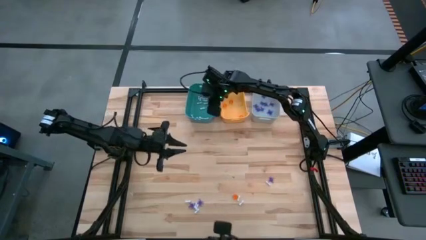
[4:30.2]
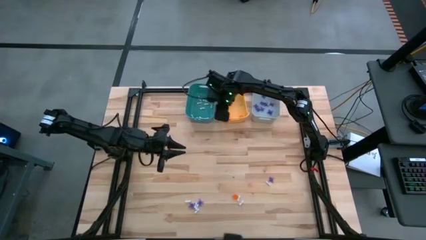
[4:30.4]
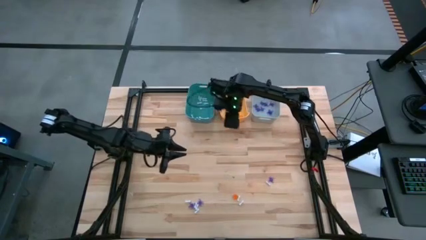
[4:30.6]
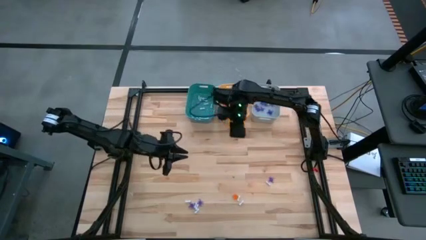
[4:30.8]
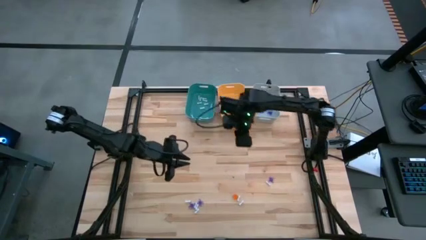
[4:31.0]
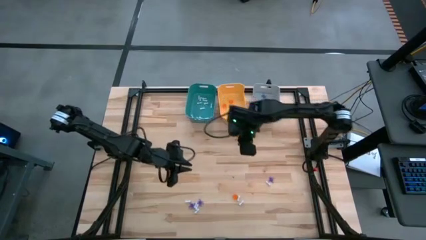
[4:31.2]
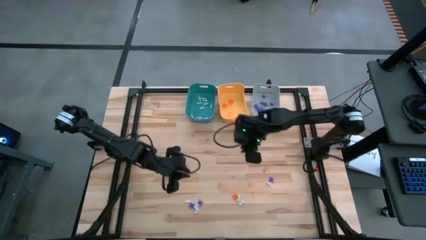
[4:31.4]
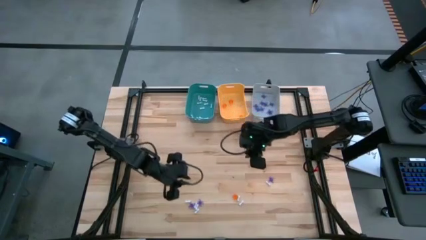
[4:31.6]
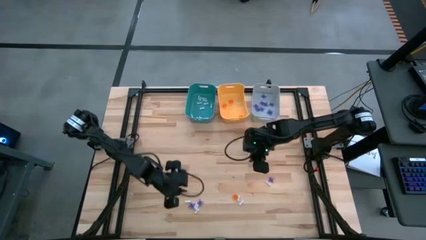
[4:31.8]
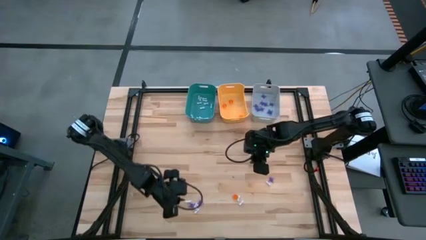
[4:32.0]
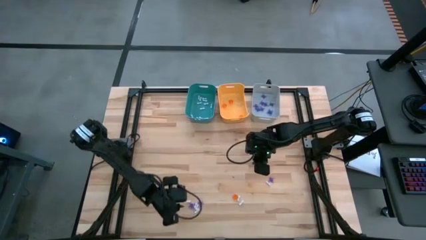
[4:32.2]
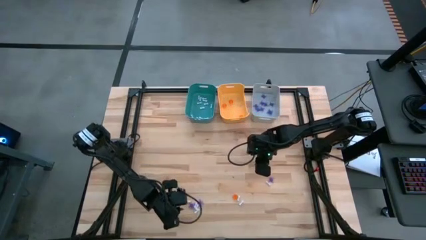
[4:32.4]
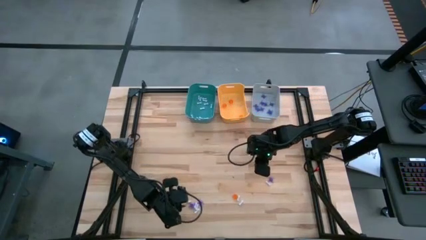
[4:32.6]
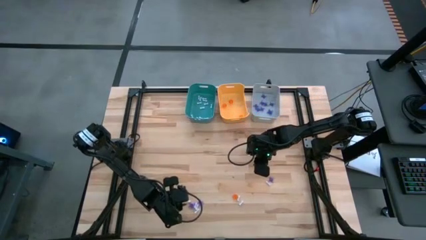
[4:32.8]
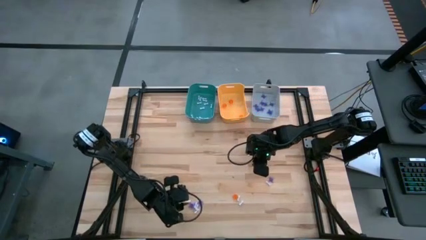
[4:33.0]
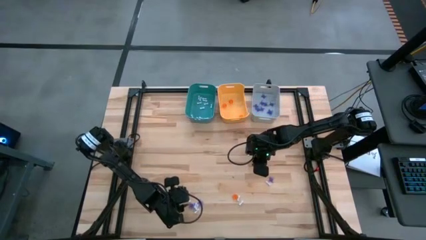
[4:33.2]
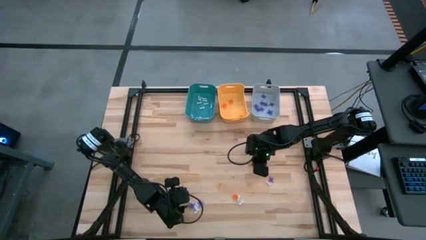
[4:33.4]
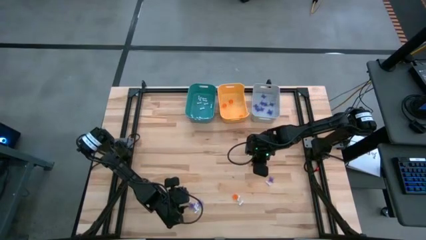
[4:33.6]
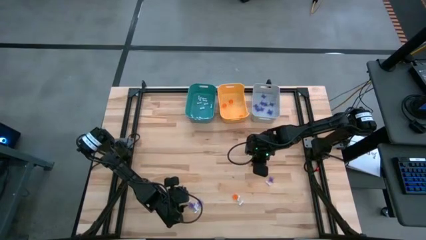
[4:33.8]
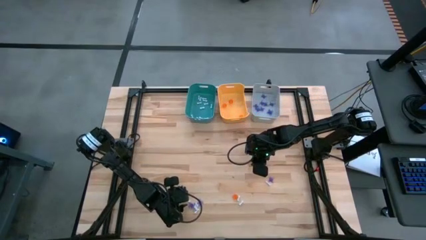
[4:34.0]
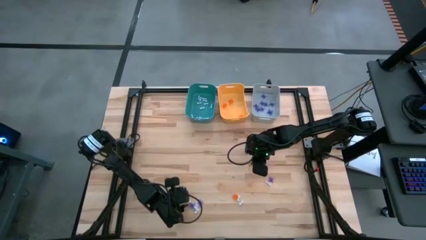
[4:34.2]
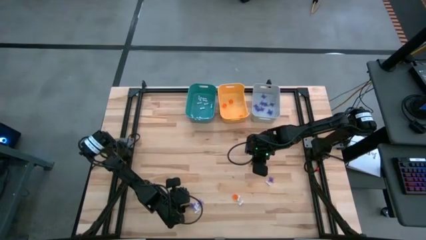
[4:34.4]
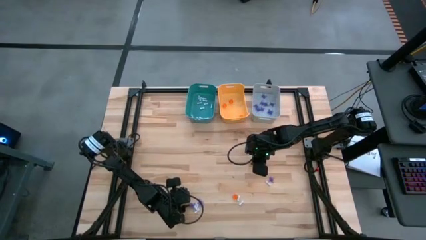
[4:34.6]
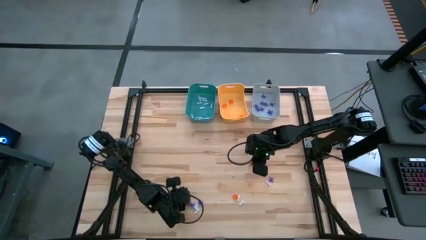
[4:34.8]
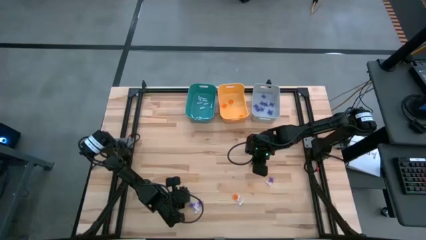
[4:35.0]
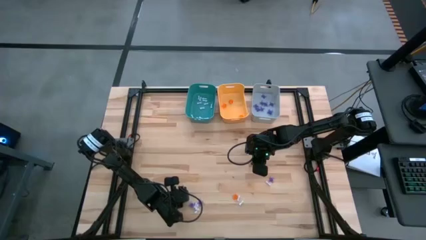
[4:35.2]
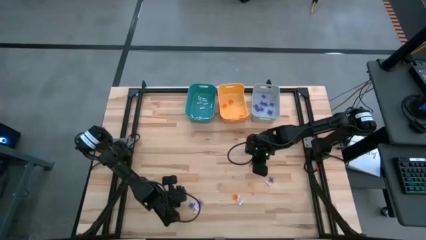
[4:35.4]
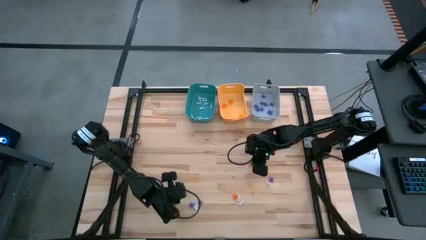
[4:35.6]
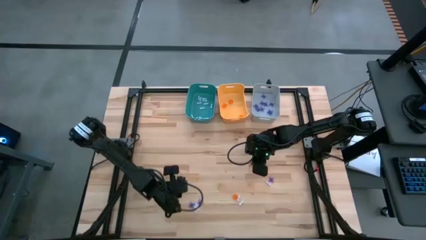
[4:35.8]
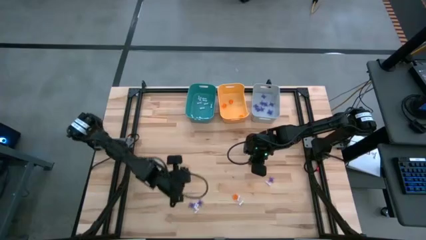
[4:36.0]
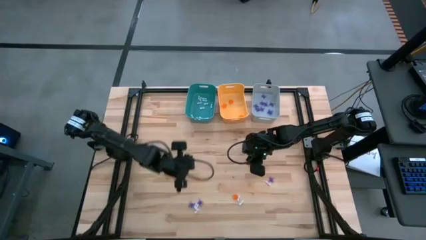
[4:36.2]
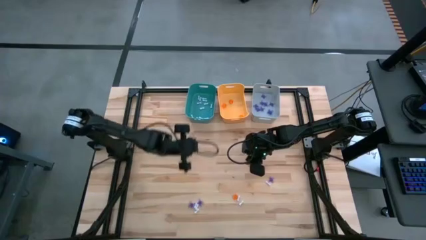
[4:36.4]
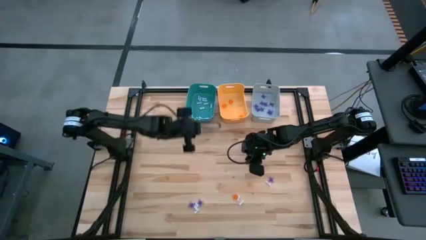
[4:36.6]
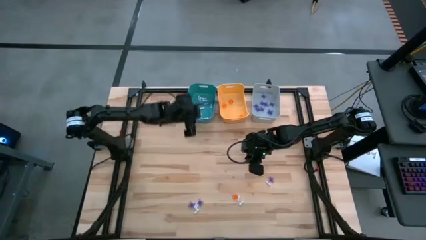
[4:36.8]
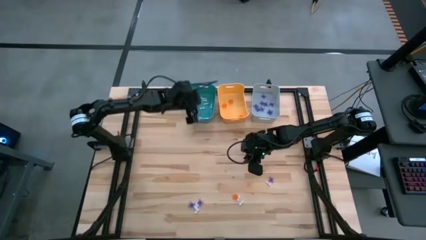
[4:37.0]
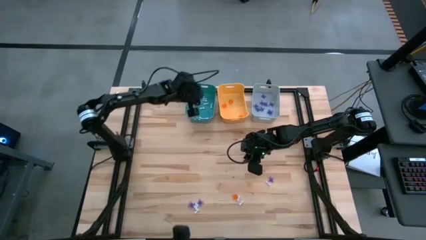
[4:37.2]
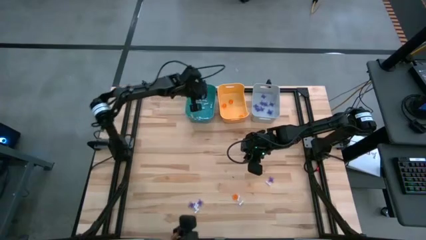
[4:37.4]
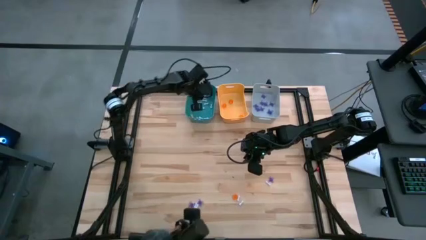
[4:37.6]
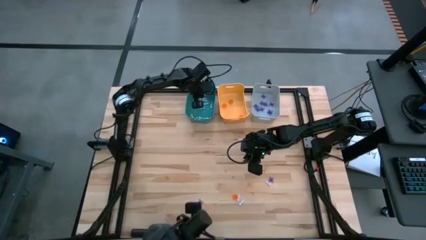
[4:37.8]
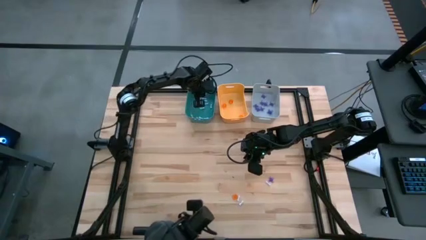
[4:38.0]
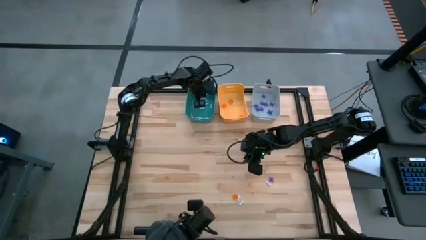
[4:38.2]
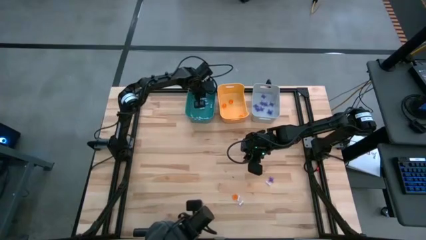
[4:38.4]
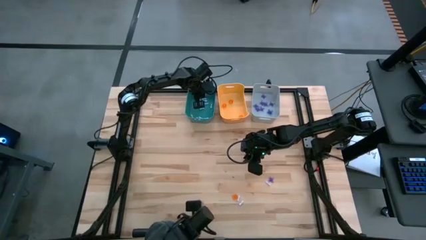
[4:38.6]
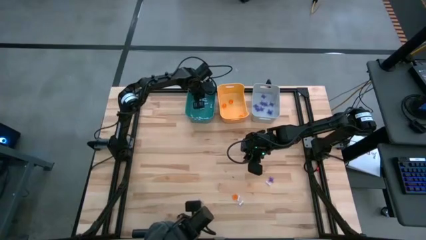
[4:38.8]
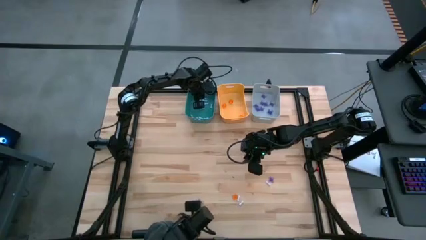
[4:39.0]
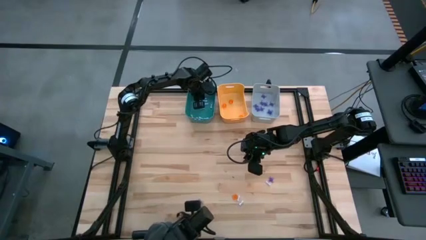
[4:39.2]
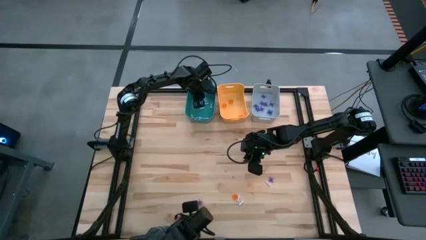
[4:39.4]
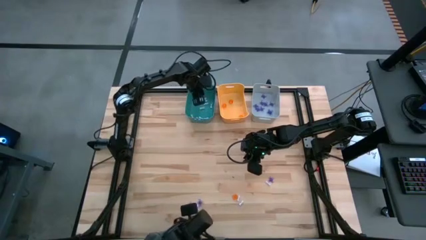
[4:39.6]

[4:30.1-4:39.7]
Task: Sort Halloween decoration
Put the white bone toy into the blue bin

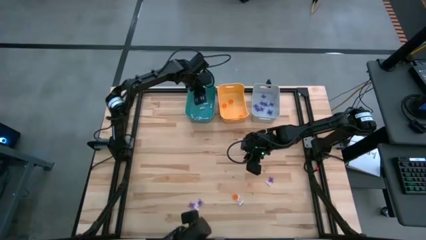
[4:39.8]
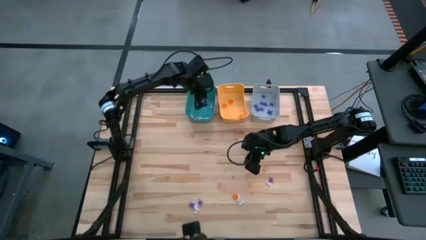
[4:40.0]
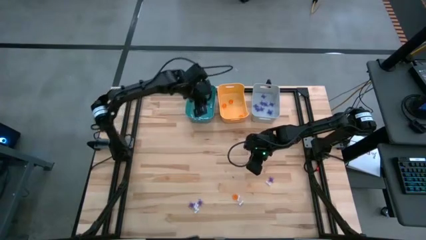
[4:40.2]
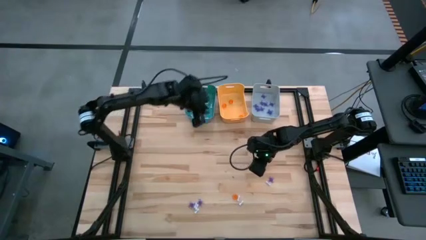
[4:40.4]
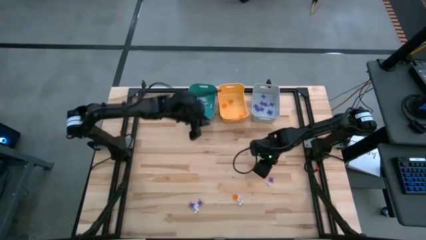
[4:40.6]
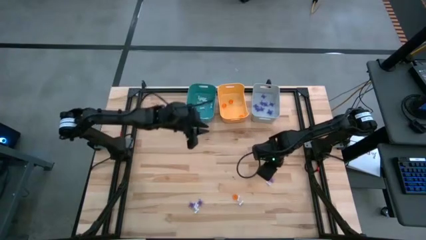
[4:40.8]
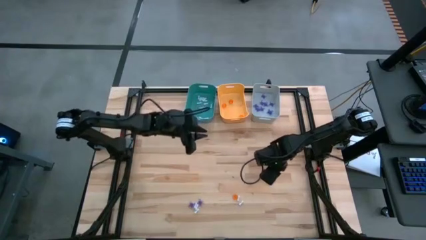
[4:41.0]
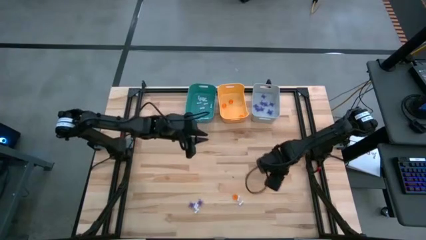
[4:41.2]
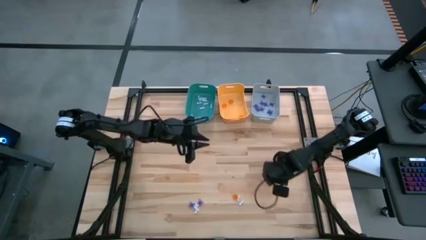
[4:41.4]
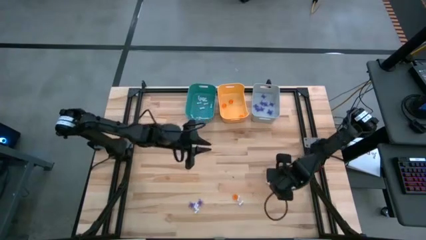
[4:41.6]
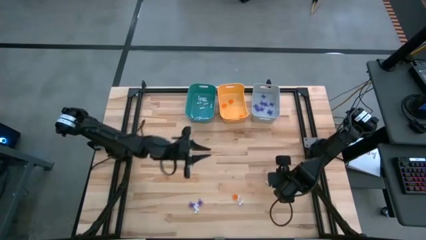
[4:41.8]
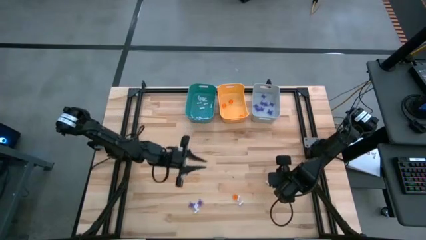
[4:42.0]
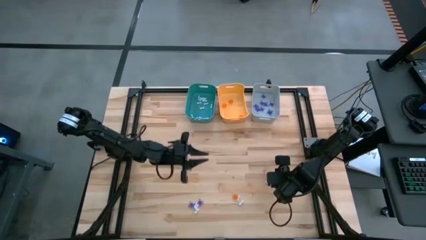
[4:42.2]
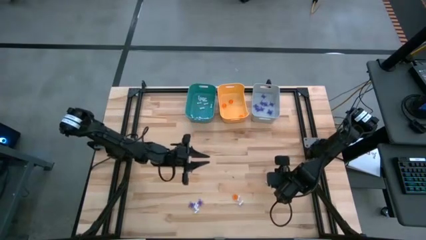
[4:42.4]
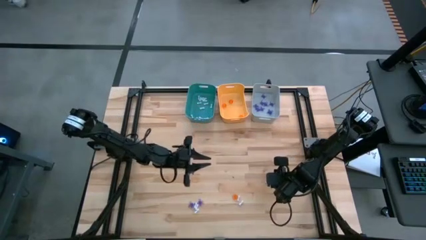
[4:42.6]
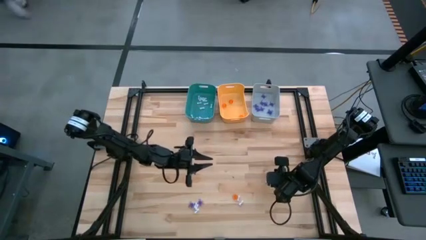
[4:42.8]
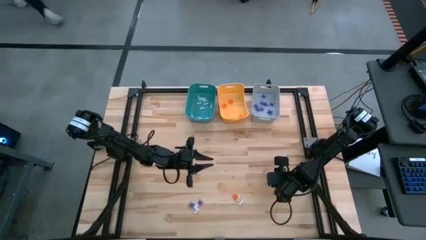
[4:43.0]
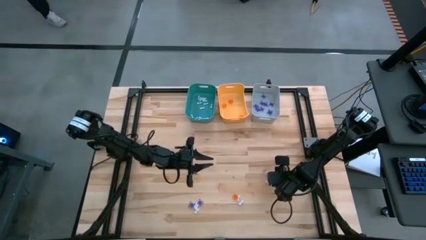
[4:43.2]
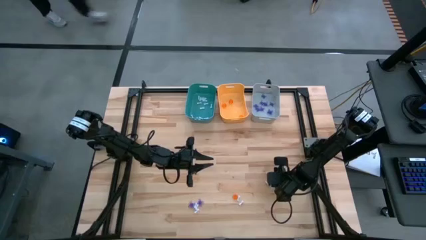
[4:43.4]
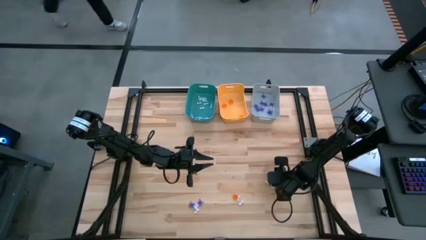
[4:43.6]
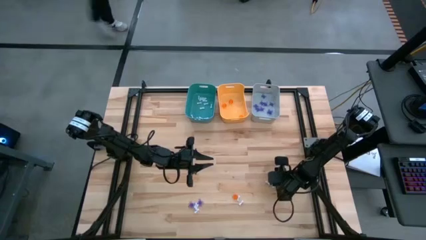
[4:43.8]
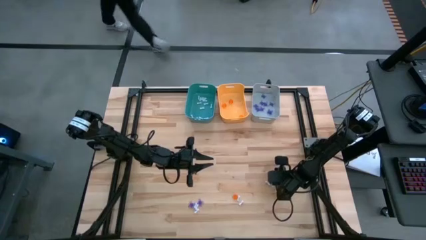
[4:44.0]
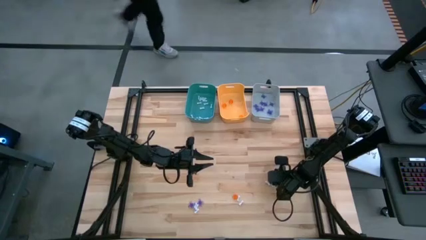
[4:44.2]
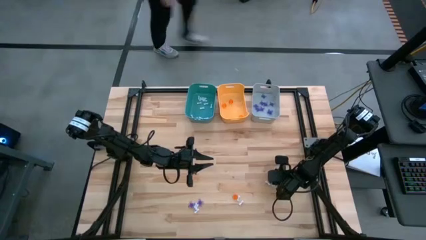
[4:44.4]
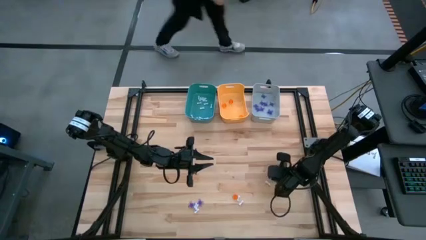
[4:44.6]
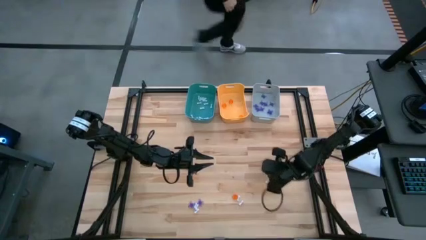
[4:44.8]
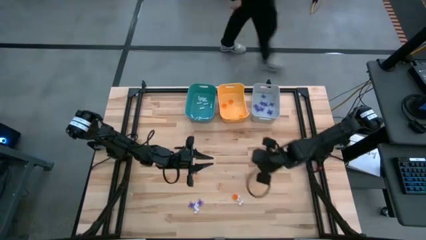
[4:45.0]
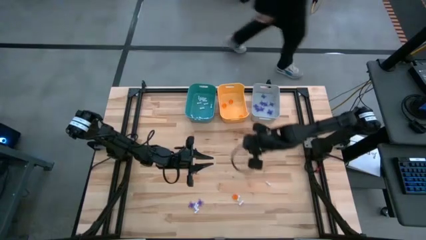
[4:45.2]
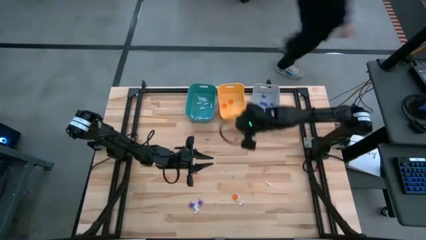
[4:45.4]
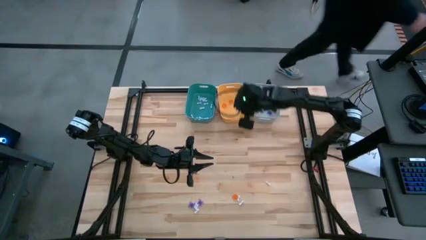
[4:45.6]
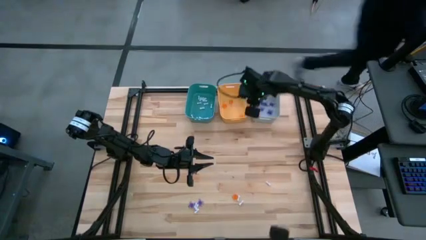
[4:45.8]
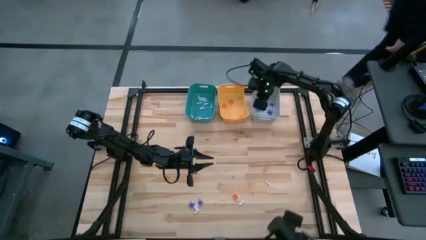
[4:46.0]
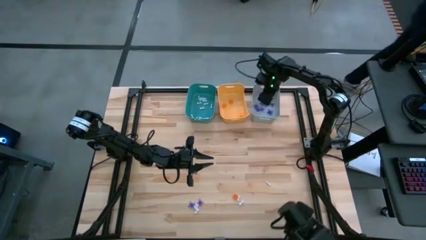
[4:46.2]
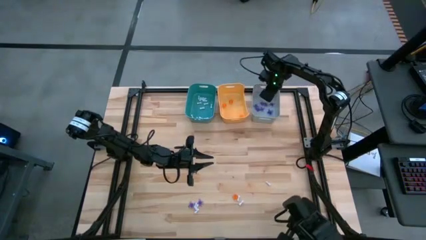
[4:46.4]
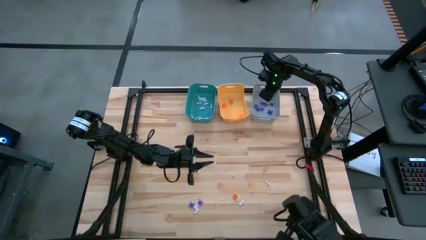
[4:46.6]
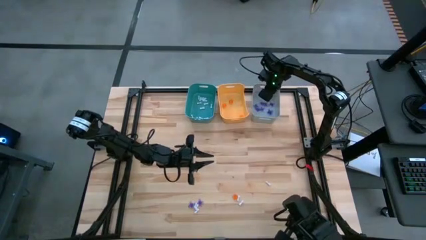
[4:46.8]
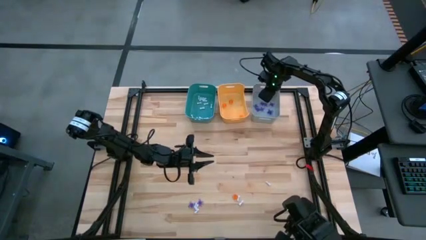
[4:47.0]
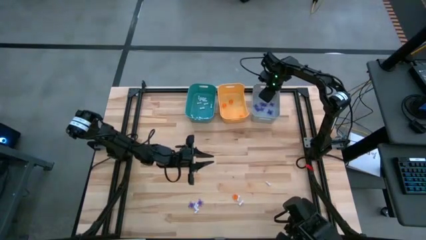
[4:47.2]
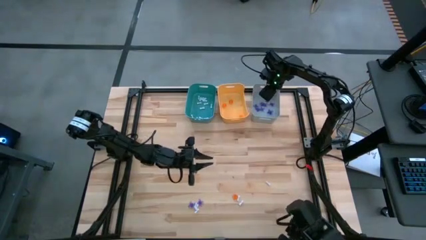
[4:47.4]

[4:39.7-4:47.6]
Put the purple spider toy into the gray bin
